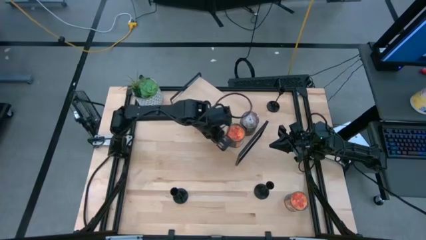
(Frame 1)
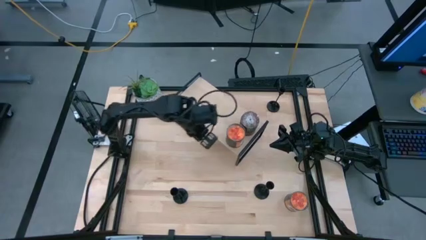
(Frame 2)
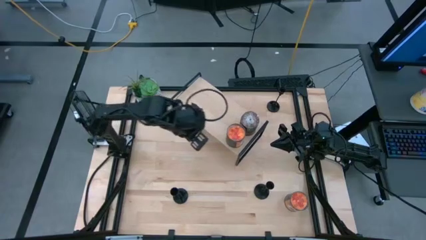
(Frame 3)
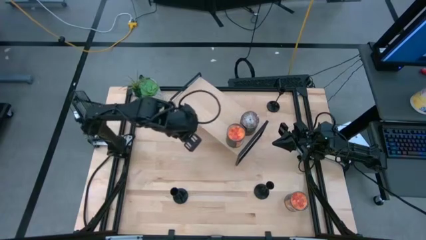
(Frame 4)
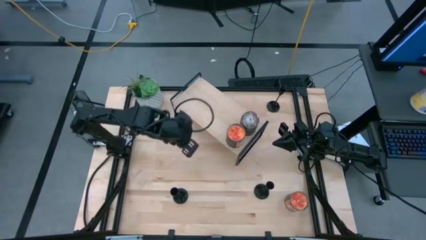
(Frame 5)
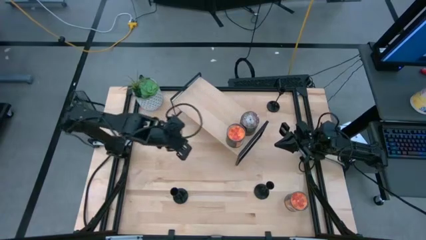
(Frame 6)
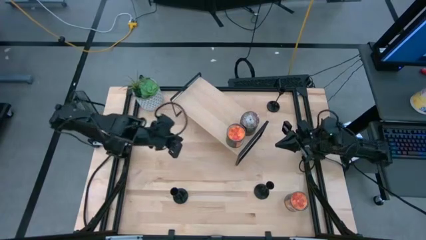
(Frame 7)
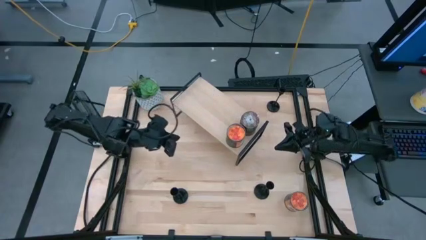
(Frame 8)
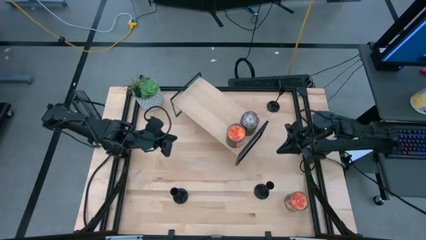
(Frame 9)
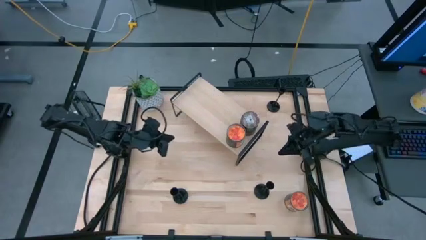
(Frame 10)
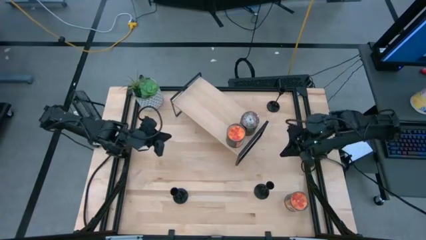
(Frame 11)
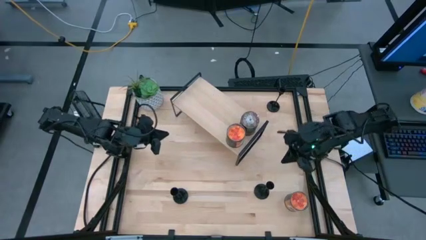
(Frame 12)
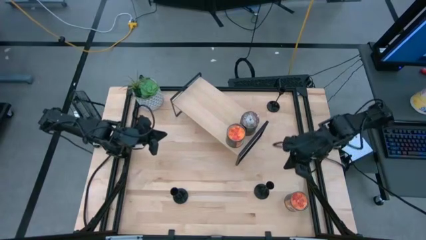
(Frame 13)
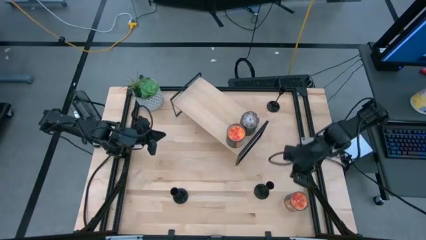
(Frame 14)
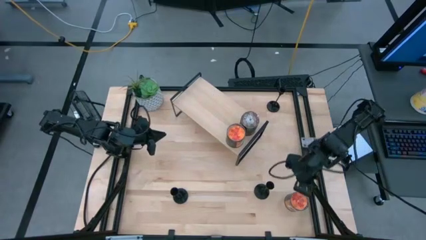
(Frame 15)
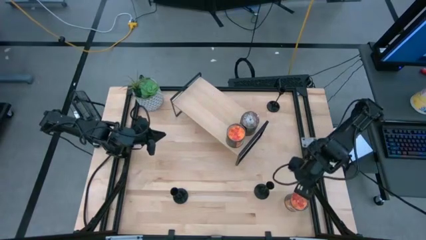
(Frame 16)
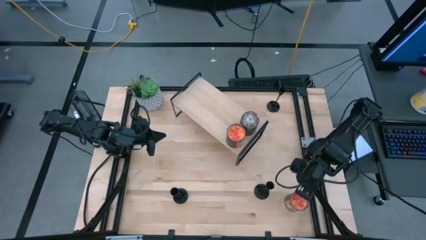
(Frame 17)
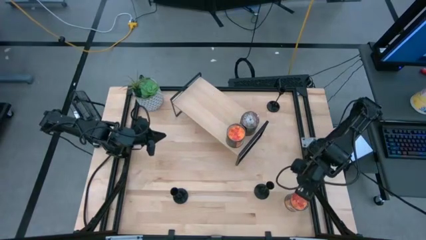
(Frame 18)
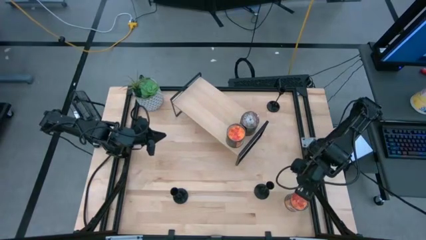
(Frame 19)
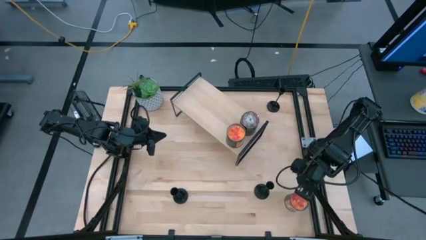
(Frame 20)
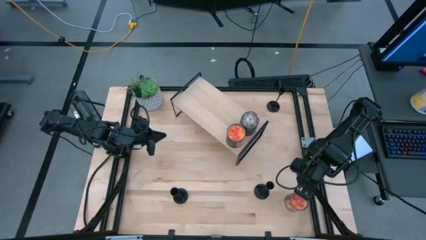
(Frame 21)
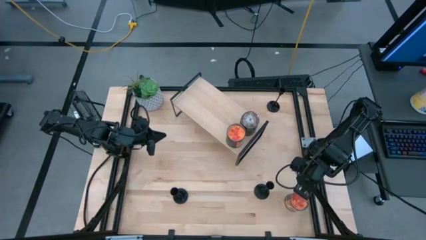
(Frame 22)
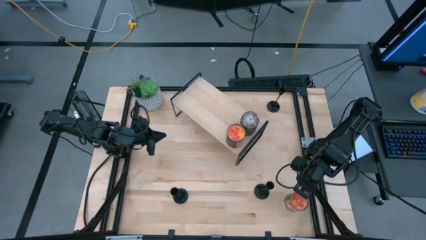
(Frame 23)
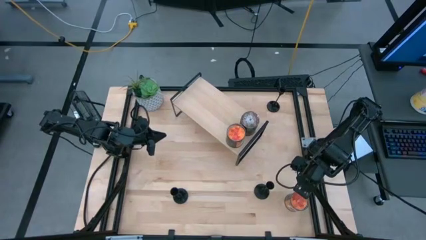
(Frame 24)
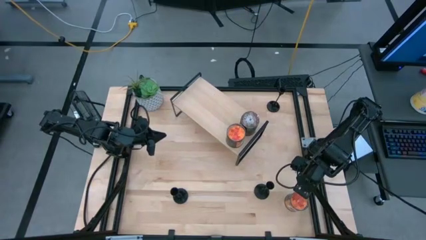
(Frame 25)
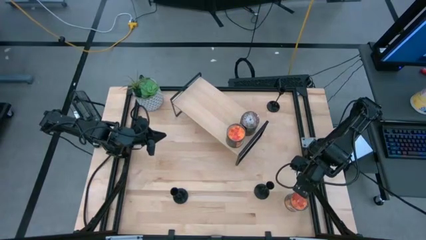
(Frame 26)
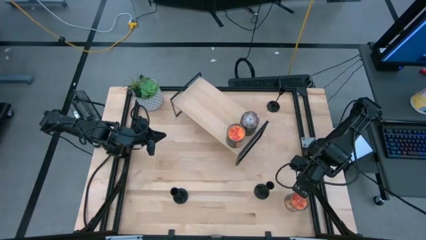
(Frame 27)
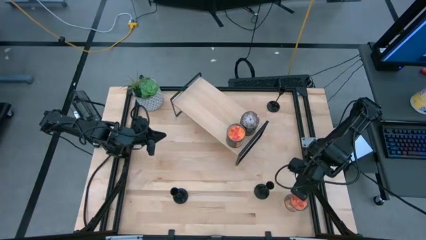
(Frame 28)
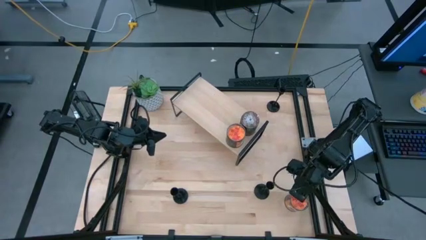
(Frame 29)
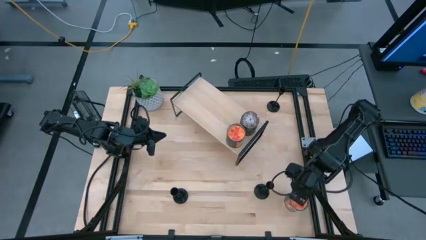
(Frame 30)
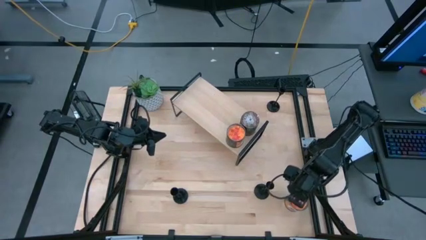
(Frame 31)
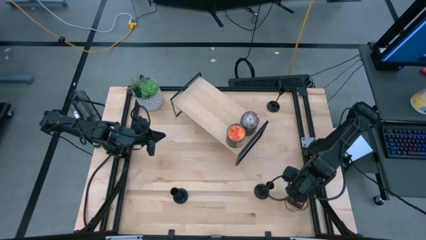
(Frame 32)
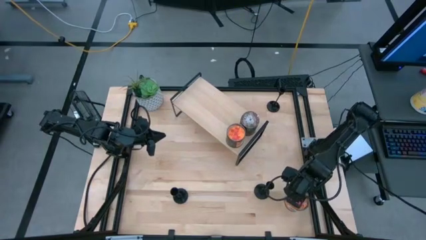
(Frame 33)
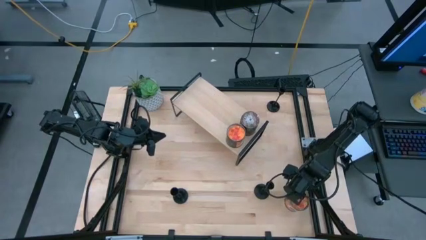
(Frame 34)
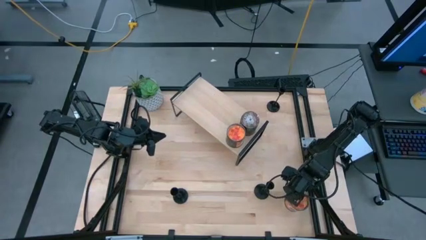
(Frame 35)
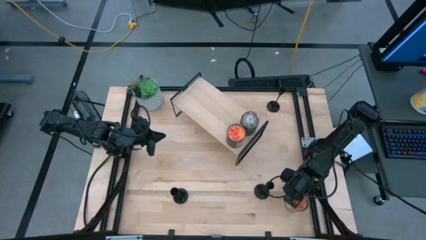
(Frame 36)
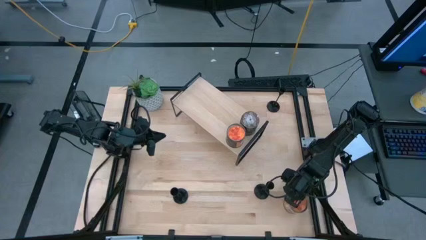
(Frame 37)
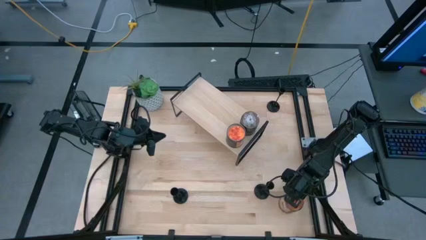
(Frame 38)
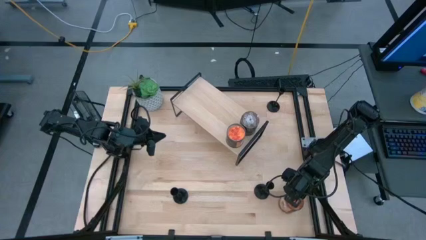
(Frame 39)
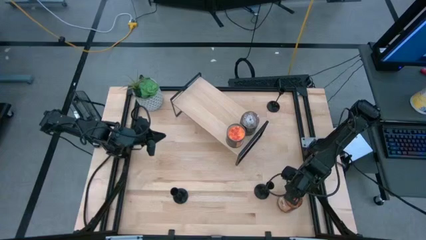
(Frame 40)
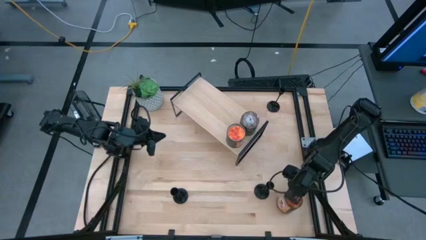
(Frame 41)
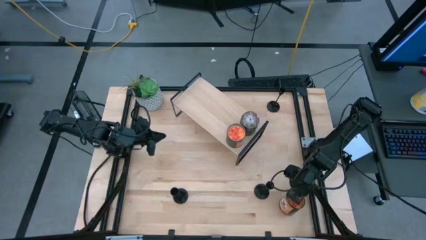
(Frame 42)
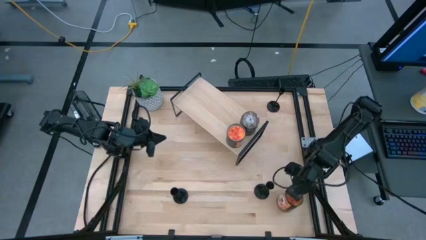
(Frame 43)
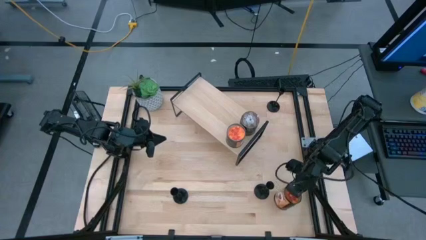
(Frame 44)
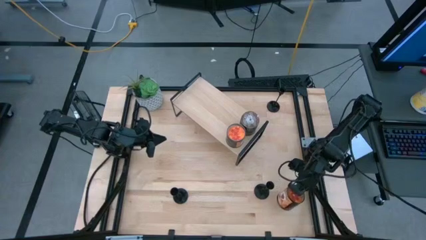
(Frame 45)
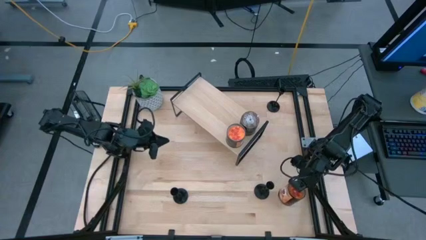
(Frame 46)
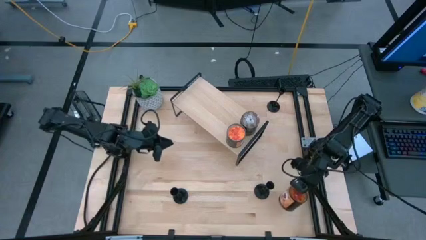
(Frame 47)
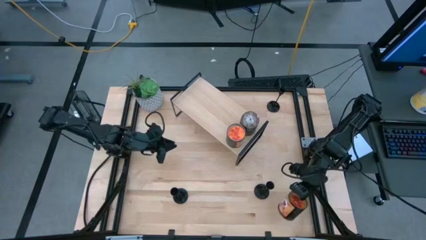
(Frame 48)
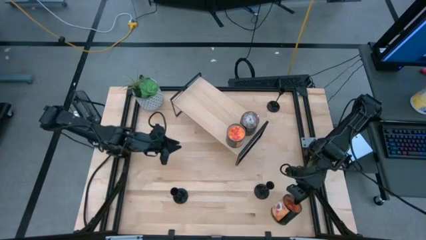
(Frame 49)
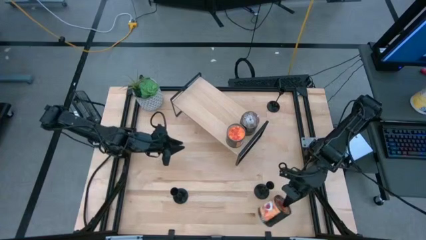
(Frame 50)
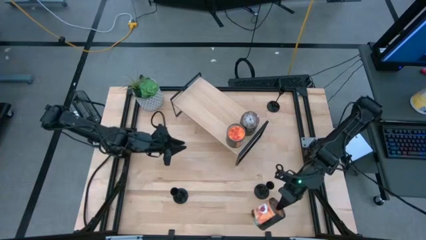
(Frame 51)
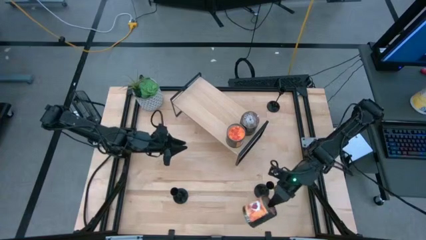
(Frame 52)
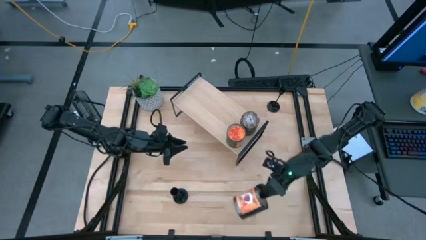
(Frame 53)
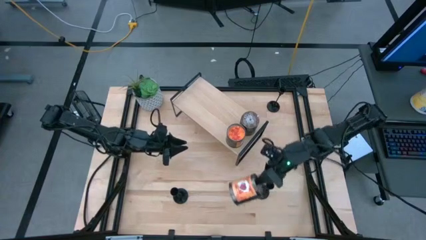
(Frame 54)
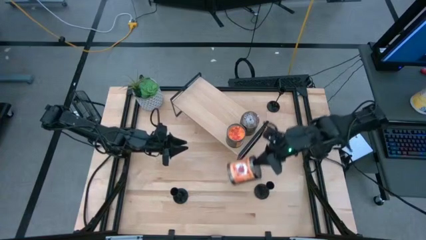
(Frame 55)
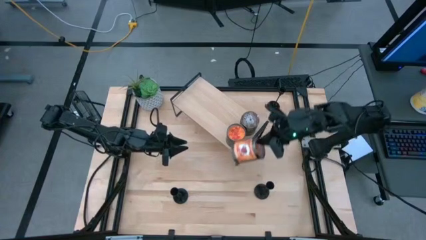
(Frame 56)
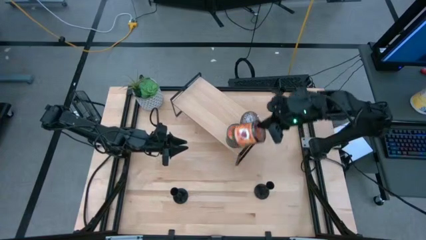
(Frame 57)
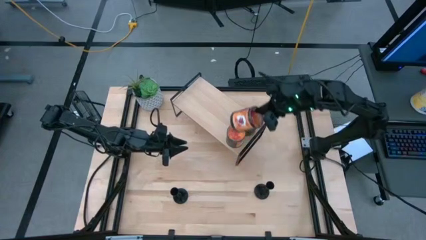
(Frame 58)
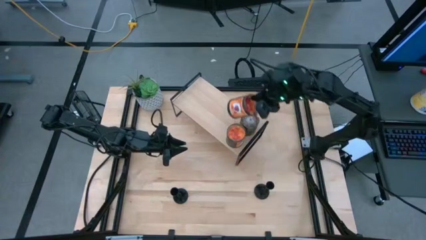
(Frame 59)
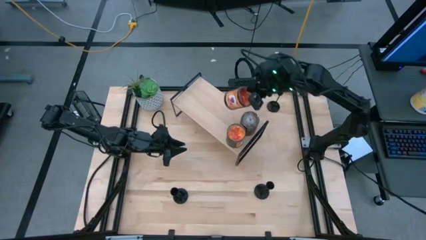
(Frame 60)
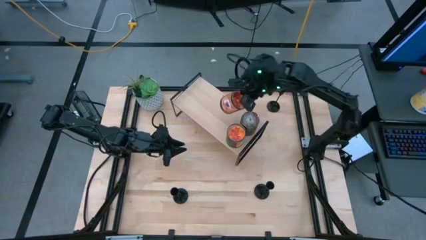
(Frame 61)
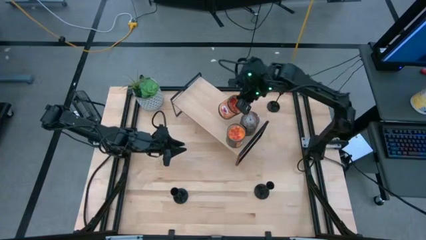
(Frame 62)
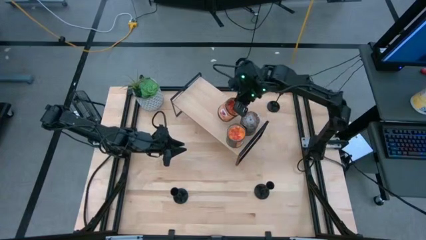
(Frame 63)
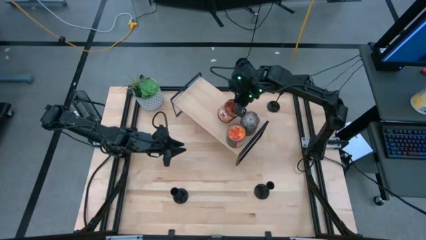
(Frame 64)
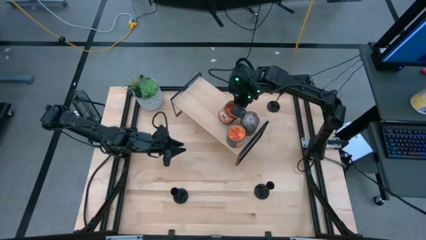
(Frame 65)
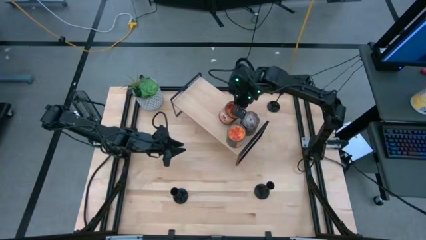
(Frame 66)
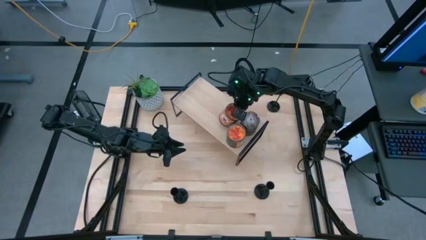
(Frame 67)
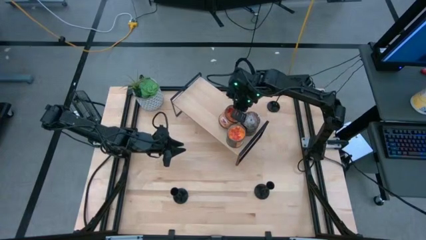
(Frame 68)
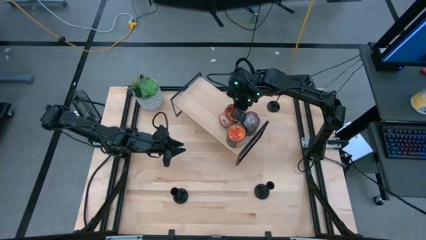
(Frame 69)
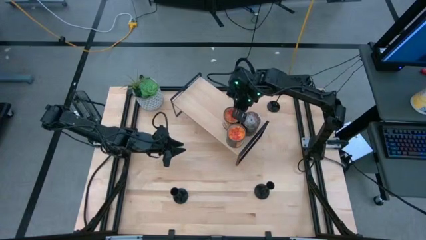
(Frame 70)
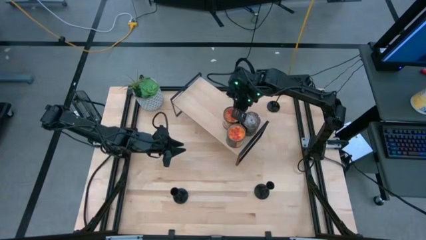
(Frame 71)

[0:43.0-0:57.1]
Task: Pick & Place candle stick holders
Put the orange scented candle on the shelf

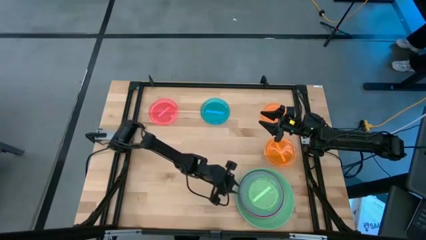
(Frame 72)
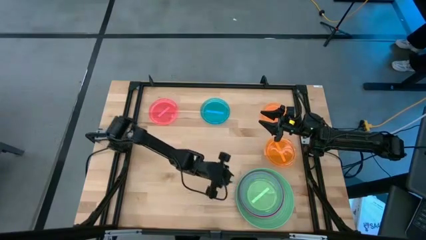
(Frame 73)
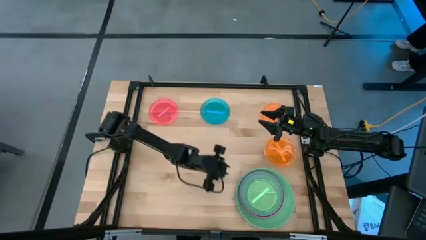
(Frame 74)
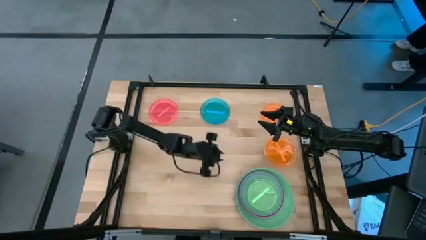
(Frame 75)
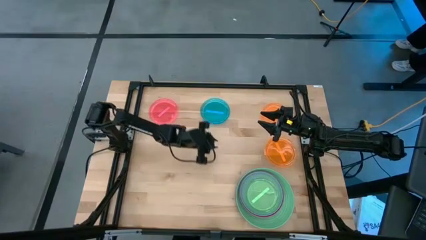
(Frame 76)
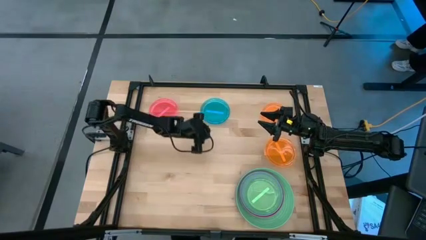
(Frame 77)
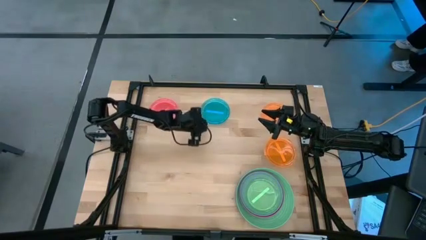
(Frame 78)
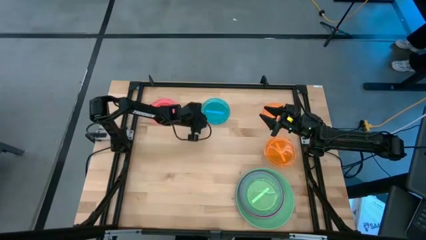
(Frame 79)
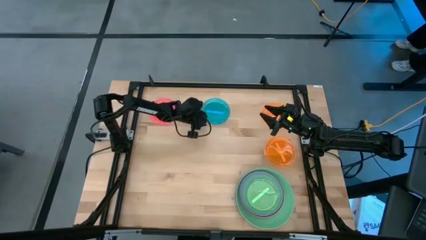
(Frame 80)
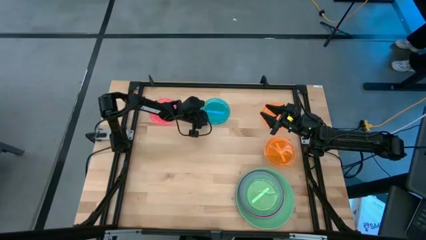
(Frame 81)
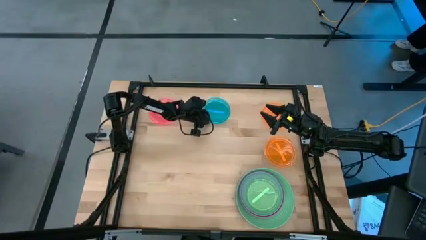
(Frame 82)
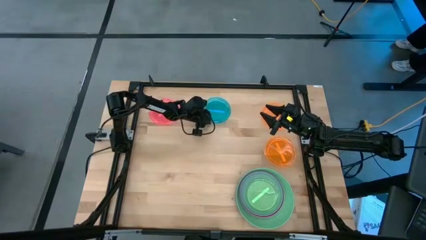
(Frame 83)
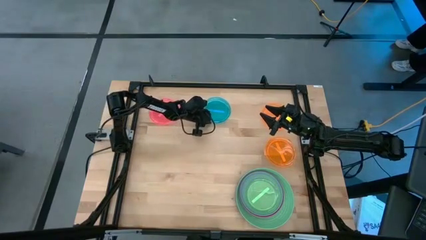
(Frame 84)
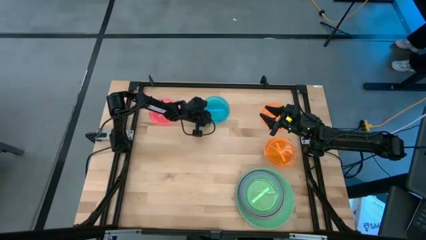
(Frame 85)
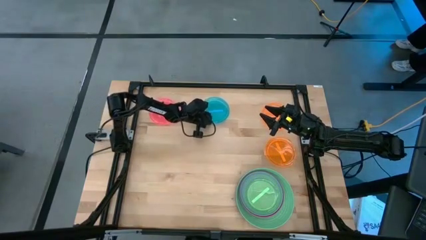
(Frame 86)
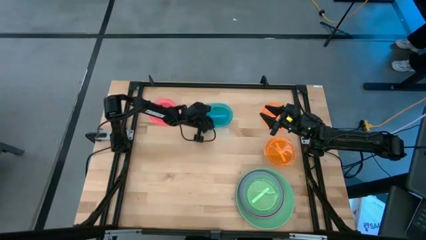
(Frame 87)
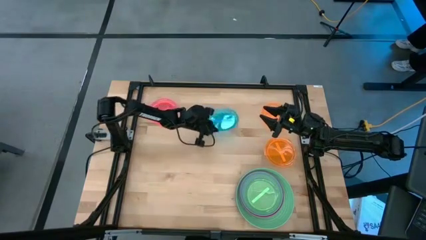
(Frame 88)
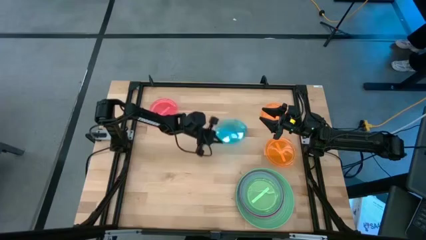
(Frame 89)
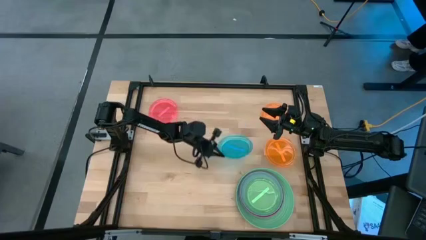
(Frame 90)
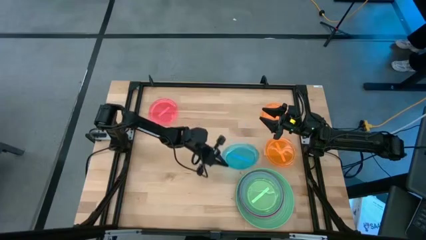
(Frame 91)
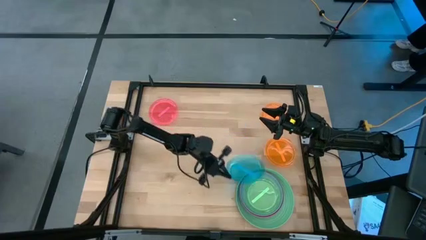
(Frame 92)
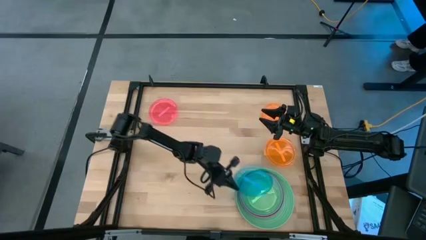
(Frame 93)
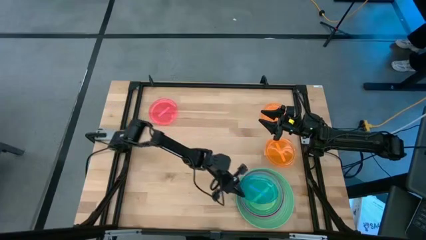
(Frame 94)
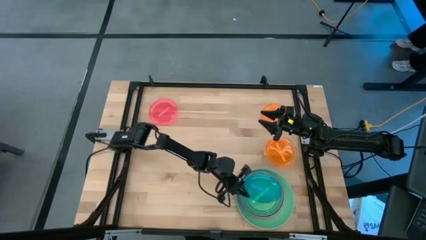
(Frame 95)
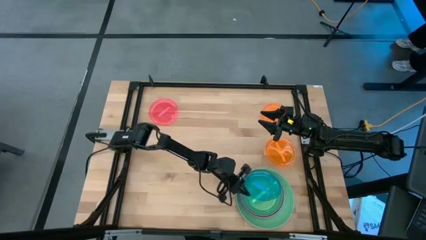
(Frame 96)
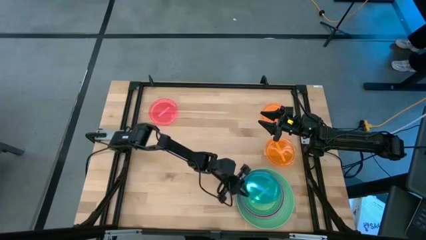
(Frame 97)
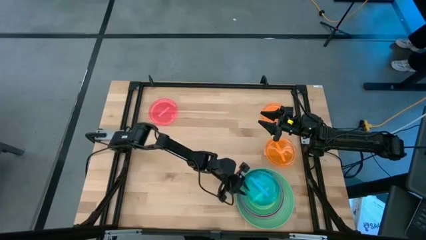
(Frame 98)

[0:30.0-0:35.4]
Task: Stack plastic plates
Stack the blue plate on top of the green plate
